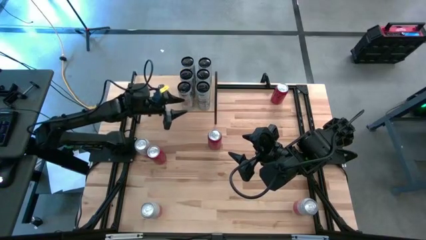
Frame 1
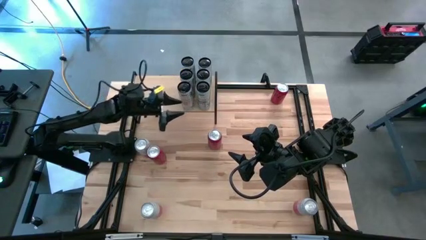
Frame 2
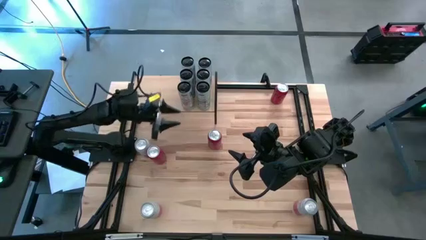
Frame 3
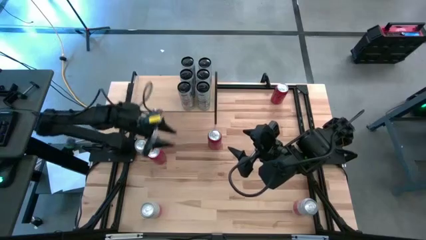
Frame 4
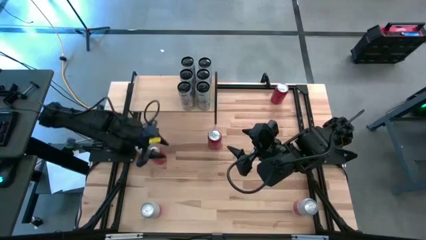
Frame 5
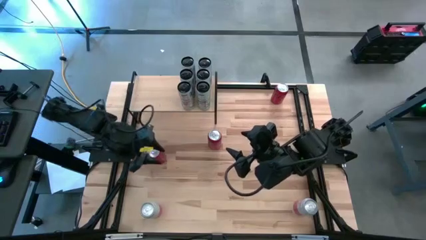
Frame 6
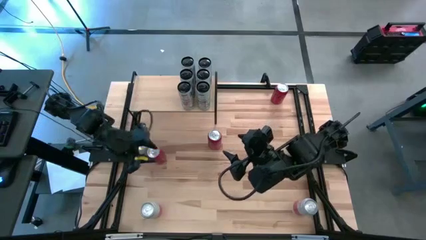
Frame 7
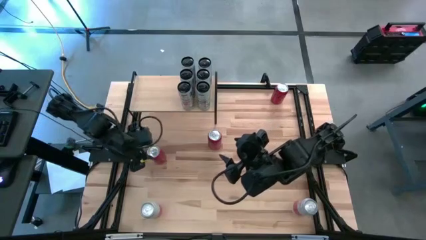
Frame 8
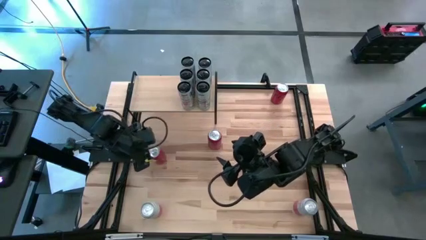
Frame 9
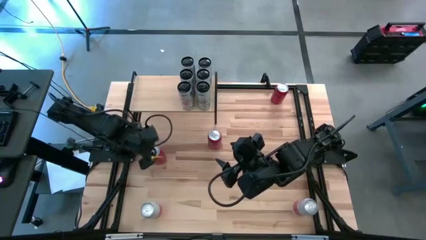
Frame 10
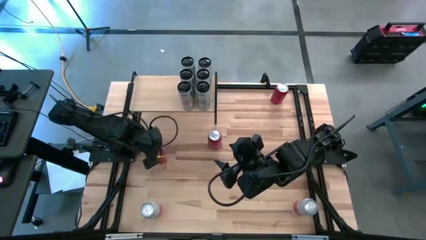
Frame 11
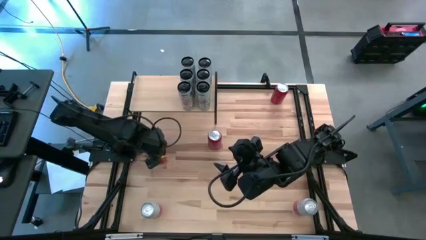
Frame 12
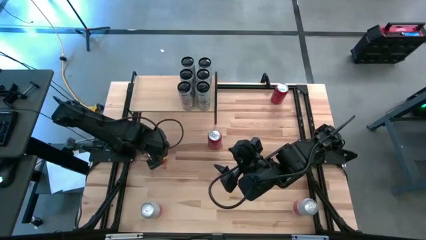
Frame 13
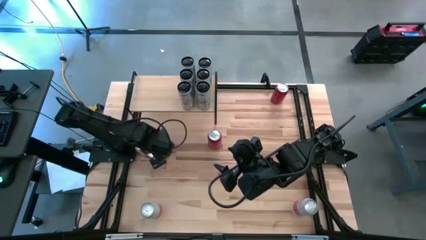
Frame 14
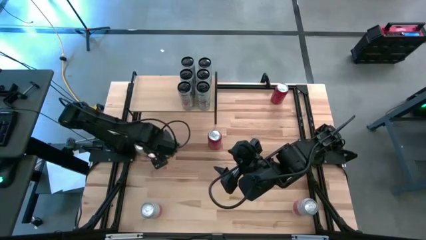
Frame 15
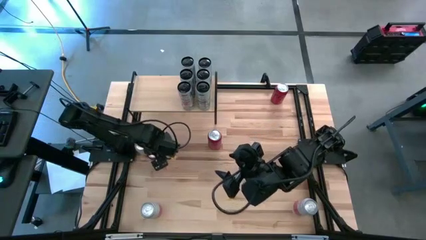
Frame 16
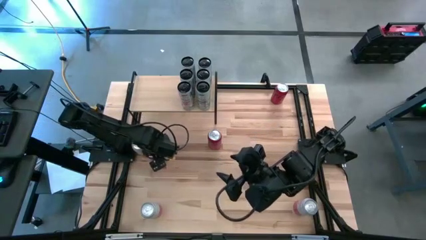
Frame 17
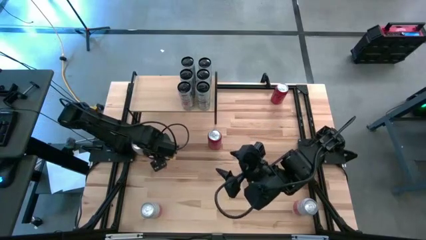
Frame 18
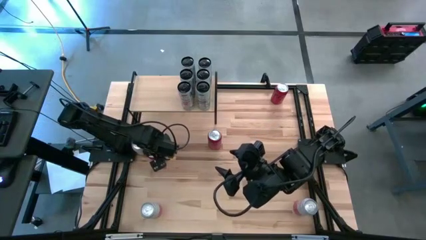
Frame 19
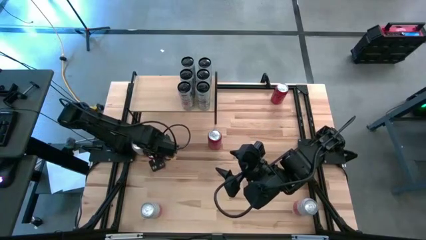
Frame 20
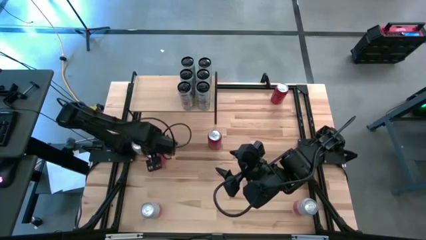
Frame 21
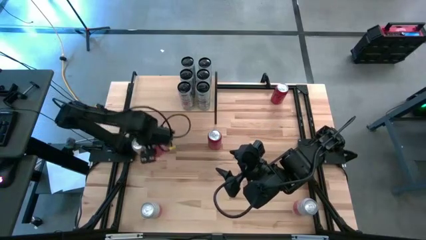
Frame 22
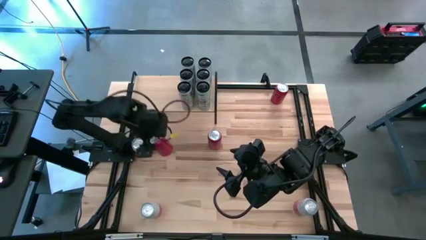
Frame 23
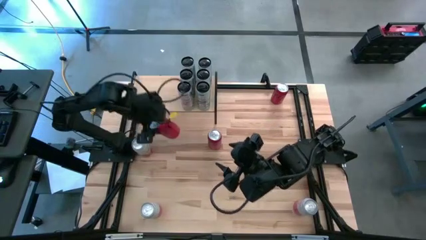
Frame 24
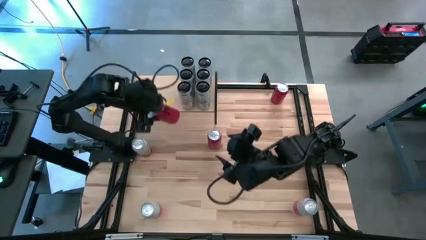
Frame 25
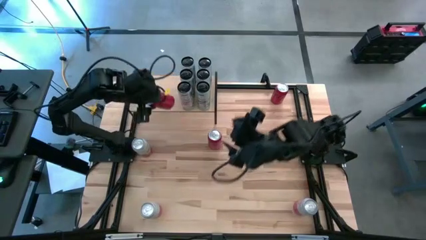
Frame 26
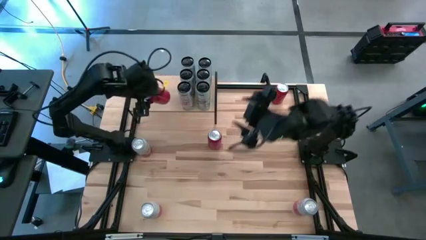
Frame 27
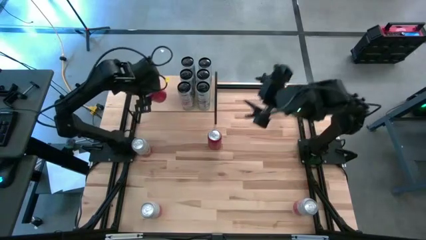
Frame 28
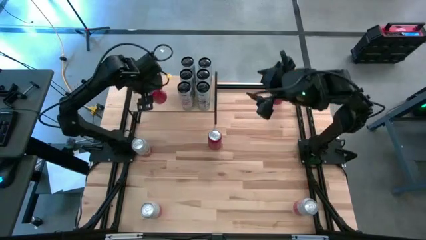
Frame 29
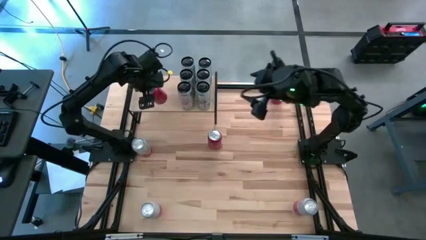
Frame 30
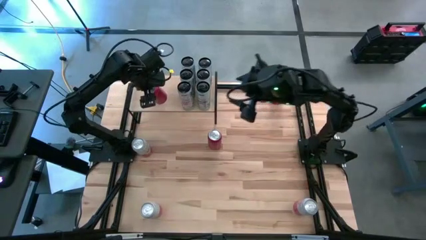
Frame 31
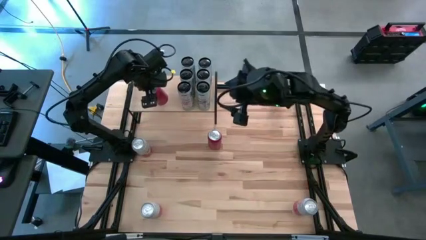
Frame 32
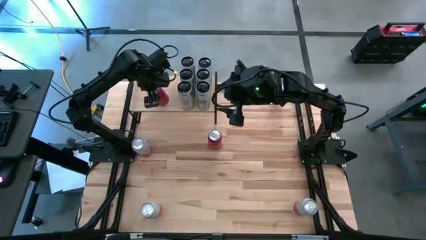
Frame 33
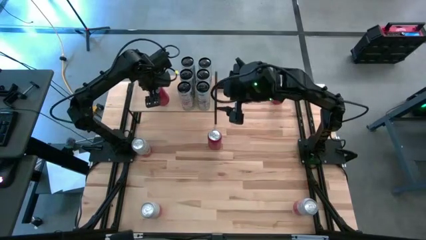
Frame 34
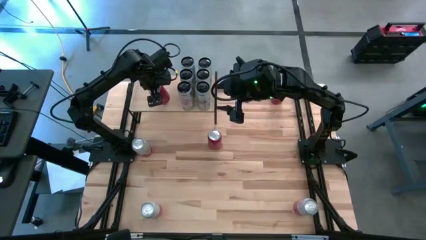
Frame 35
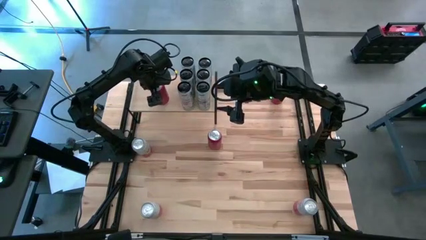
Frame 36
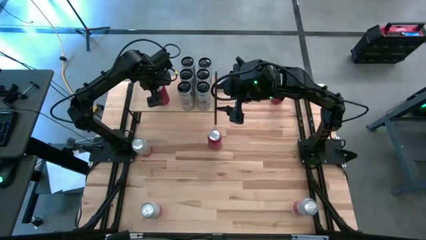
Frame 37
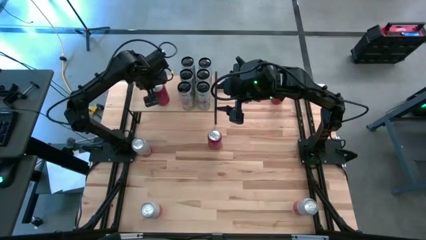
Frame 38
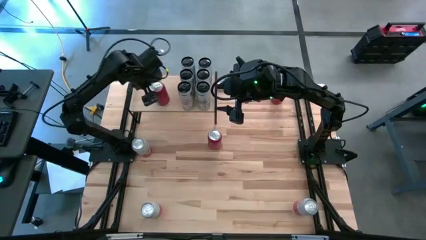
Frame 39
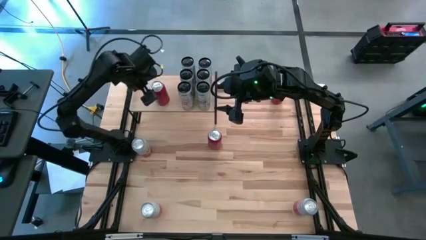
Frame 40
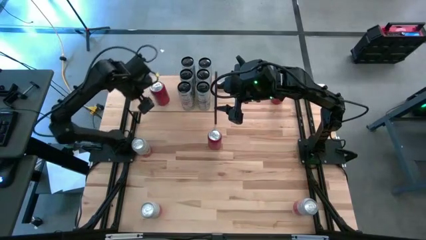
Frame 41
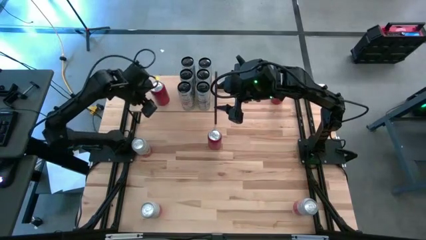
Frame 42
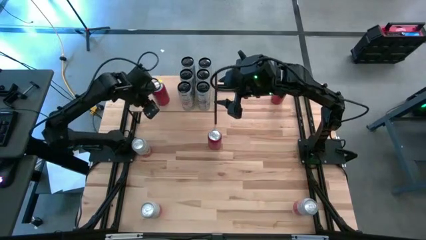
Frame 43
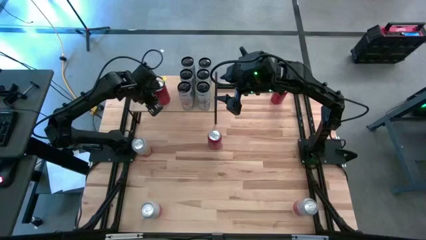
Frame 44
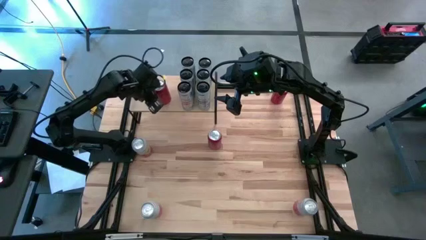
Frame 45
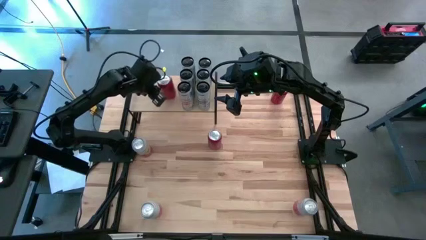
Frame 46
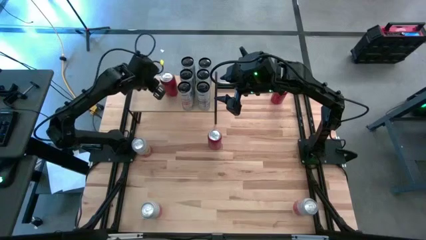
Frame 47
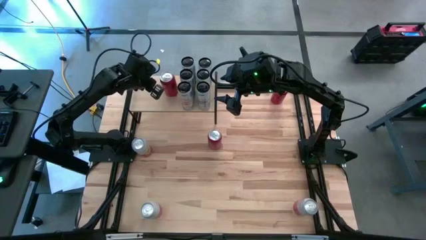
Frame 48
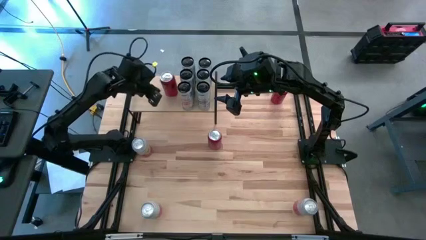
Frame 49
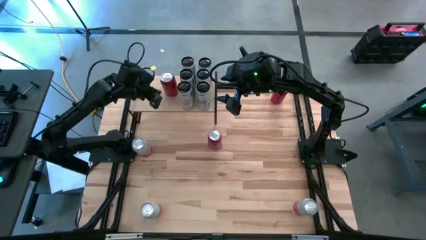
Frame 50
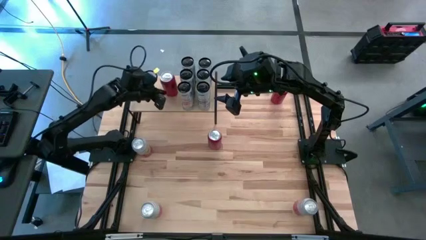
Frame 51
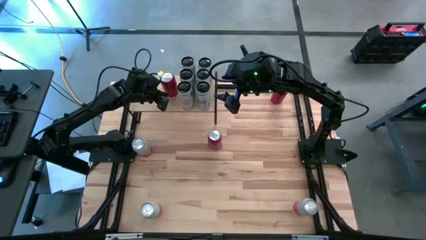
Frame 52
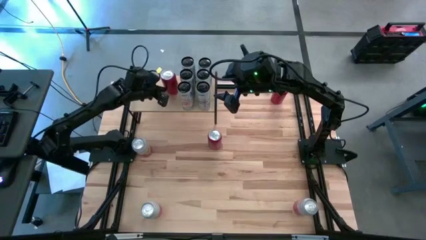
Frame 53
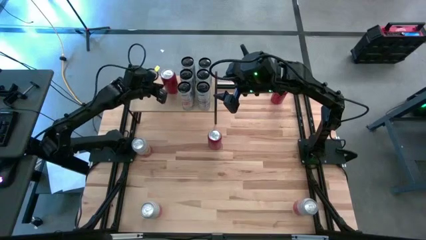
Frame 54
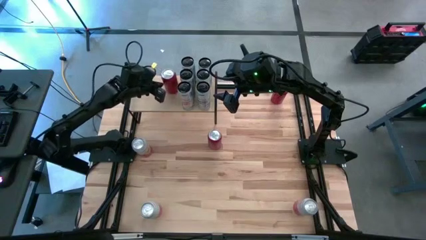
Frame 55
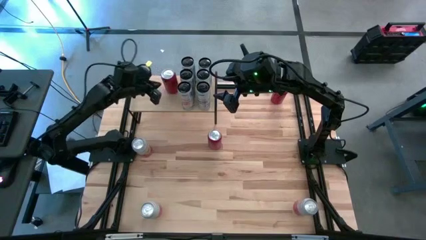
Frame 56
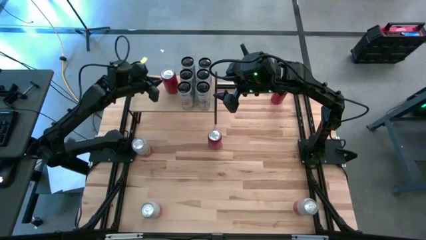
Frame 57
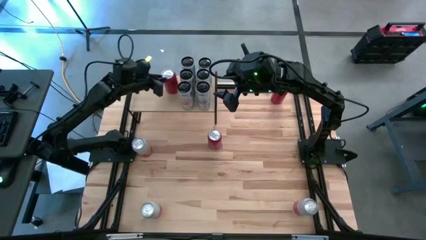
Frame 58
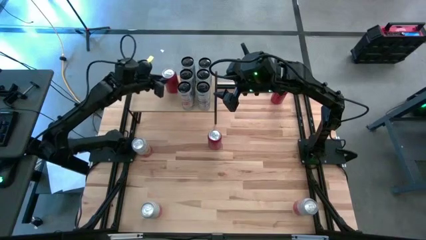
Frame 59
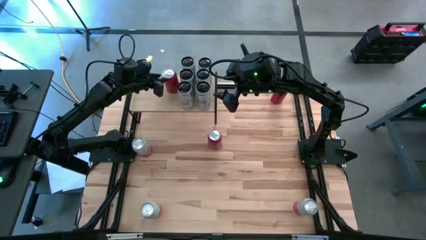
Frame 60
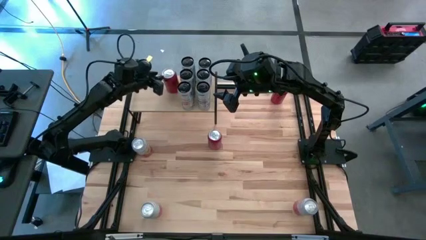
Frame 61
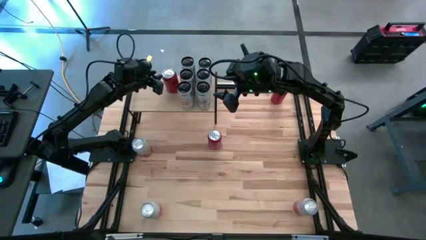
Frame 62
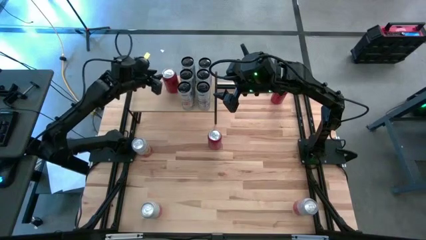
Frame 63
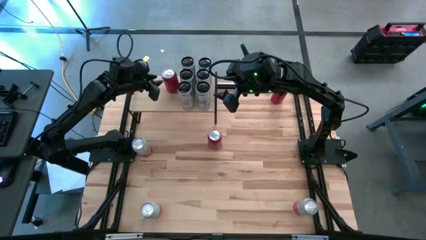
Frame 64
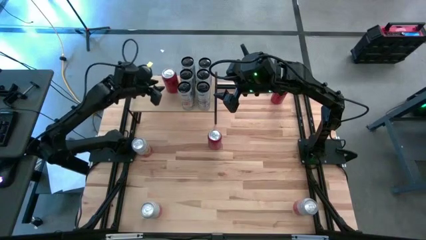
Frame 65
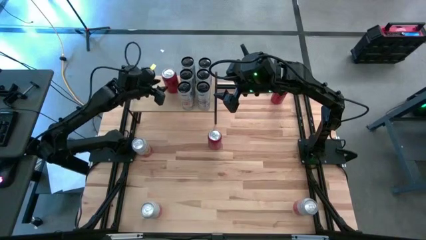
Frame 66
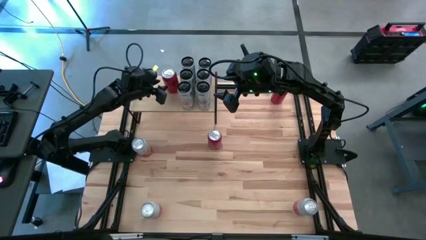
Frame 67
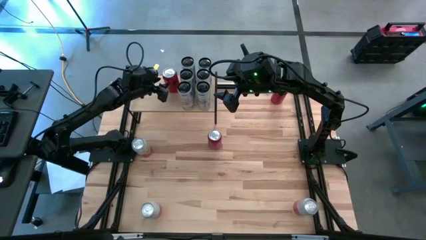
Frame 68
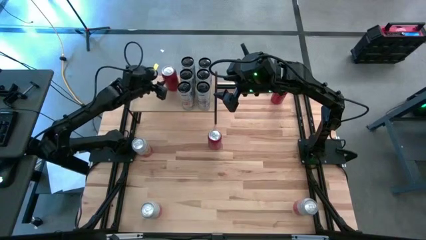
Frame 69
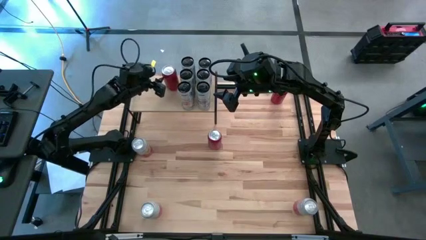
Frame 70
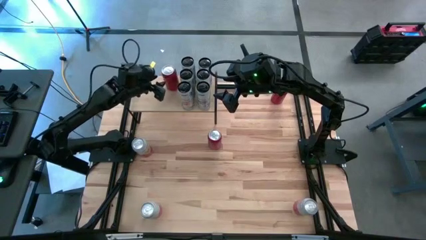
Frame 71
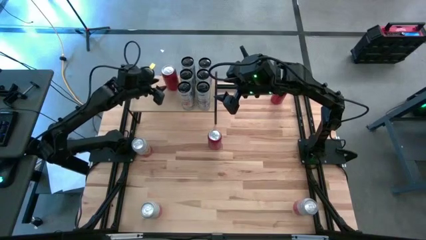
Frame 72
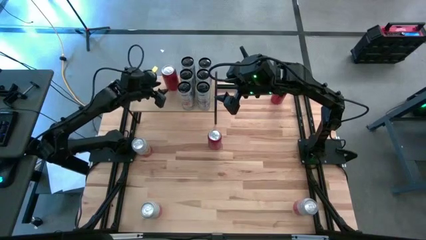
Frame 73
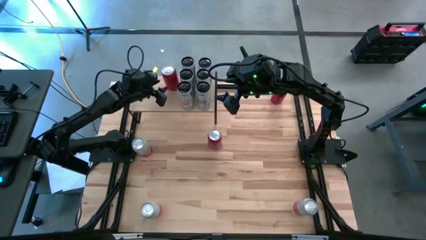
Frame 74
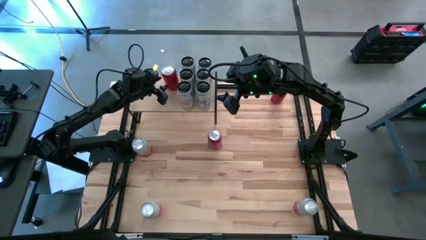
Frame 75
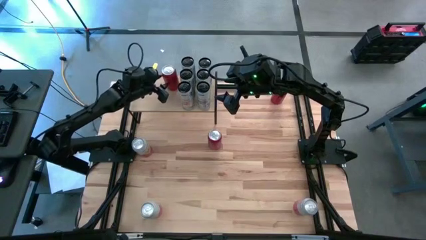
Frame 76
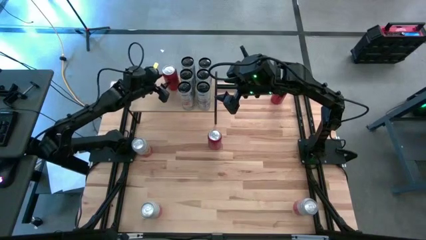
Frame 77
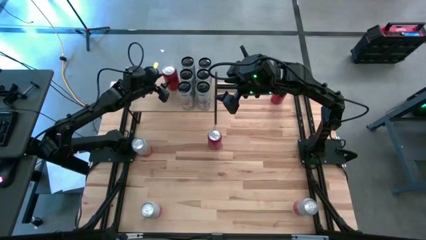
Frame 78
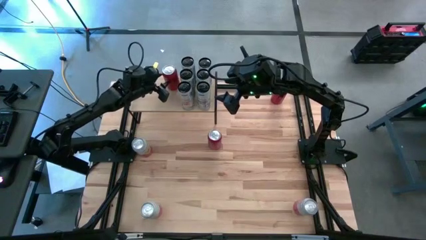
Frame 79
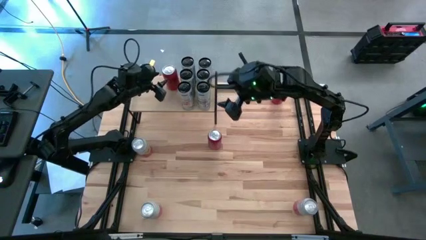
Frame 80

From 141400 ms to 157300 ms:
Task: Place canned beverage on shelf
Put the bottom left red soda can on the shelf
